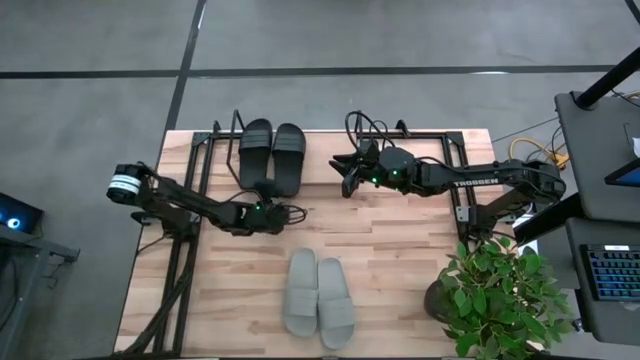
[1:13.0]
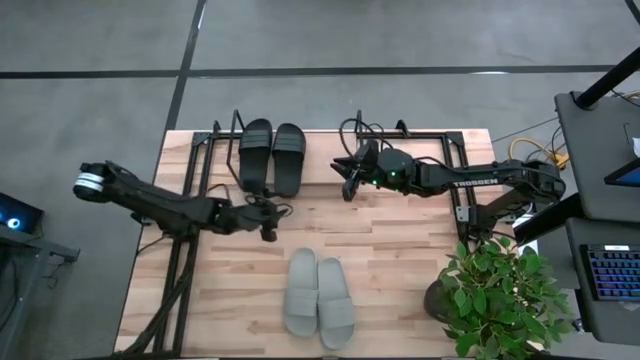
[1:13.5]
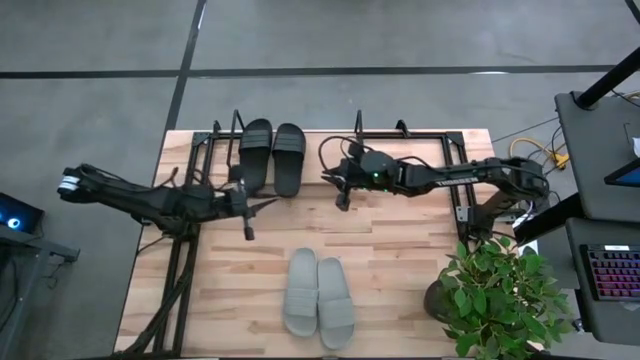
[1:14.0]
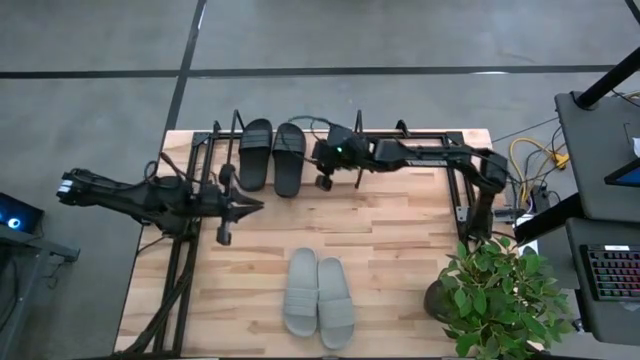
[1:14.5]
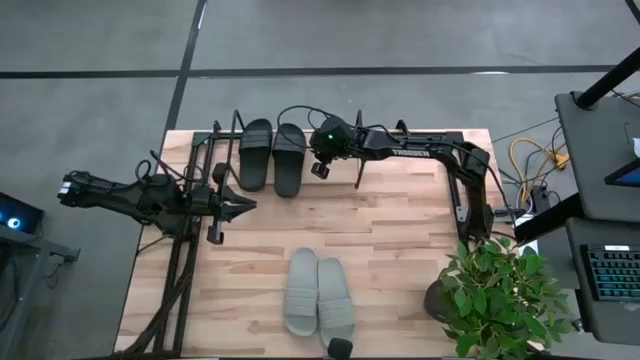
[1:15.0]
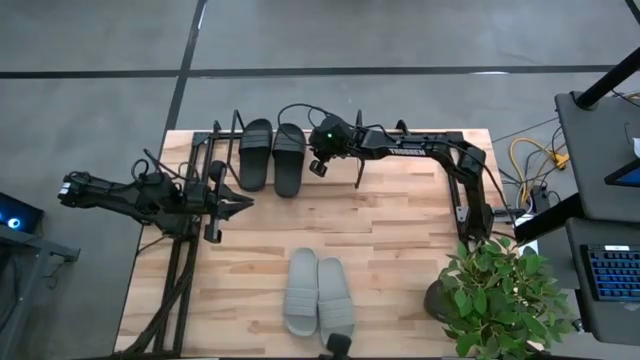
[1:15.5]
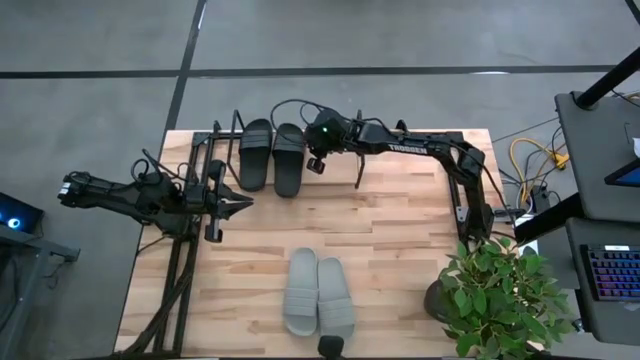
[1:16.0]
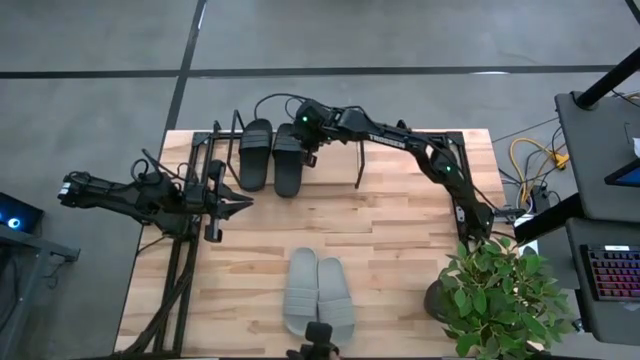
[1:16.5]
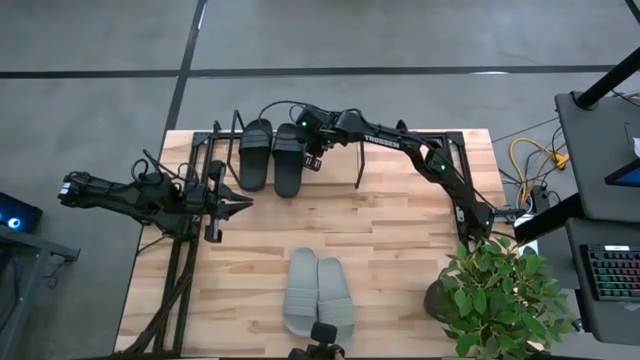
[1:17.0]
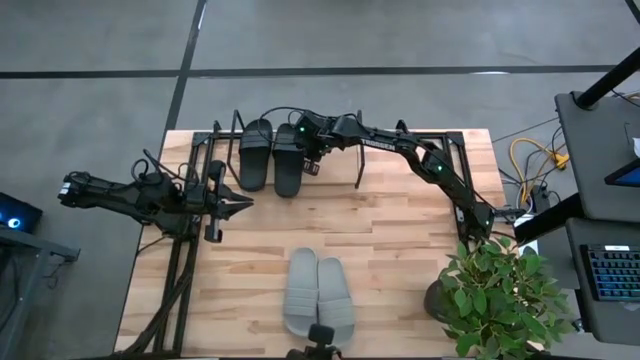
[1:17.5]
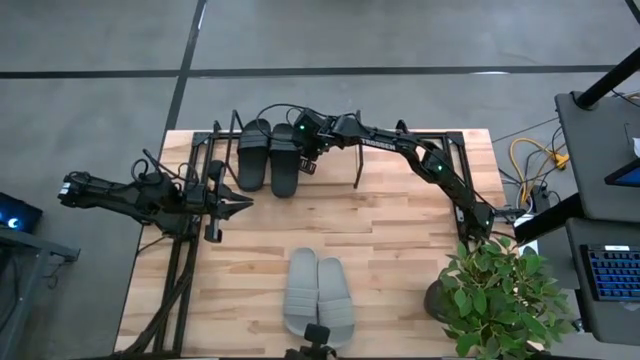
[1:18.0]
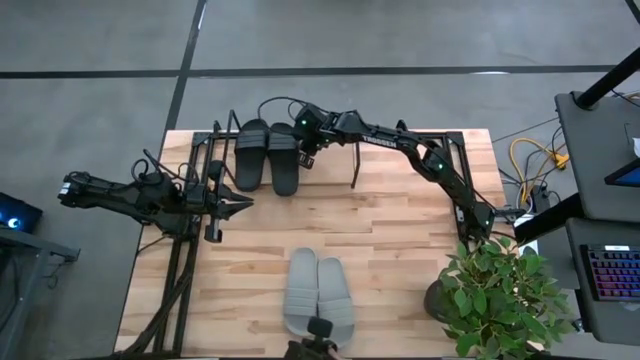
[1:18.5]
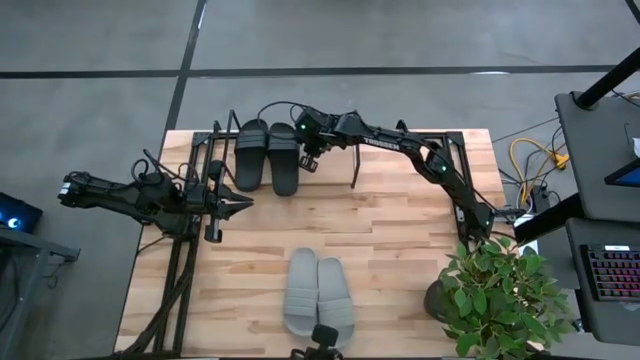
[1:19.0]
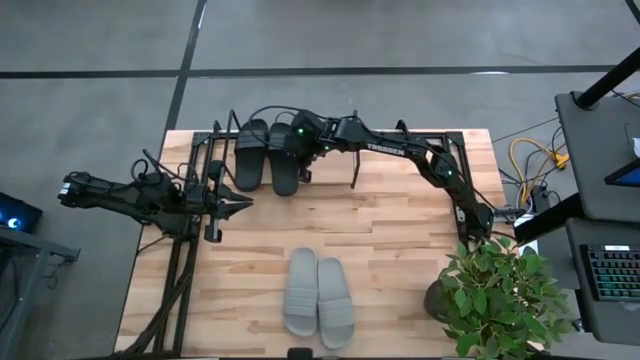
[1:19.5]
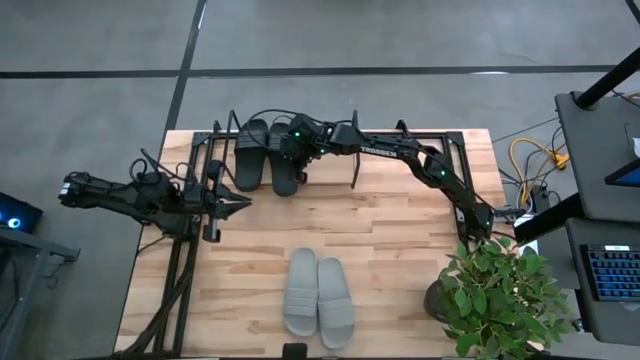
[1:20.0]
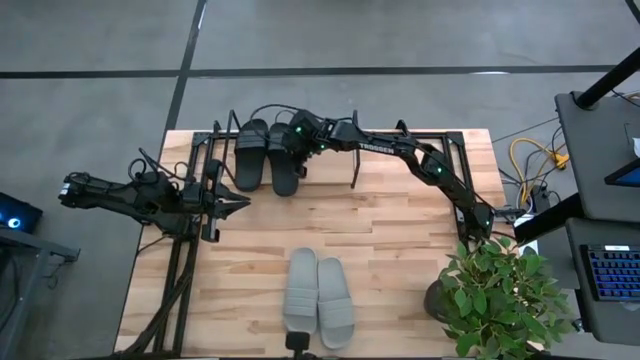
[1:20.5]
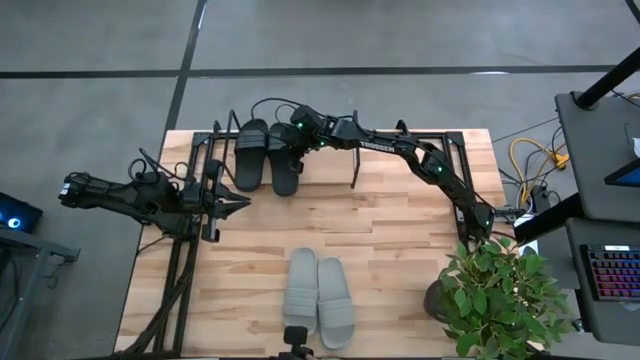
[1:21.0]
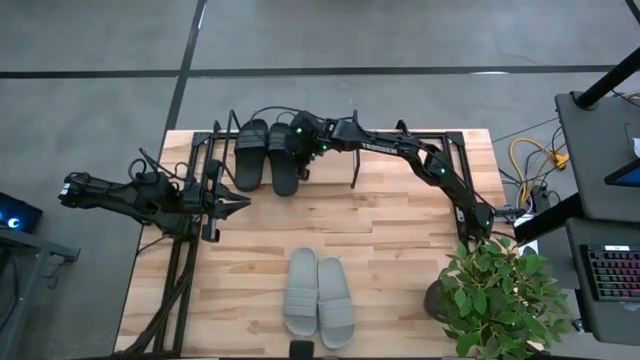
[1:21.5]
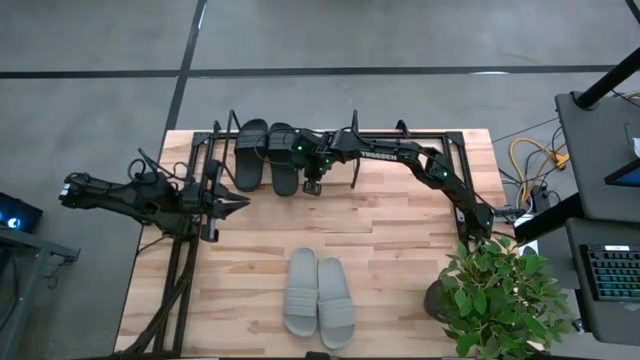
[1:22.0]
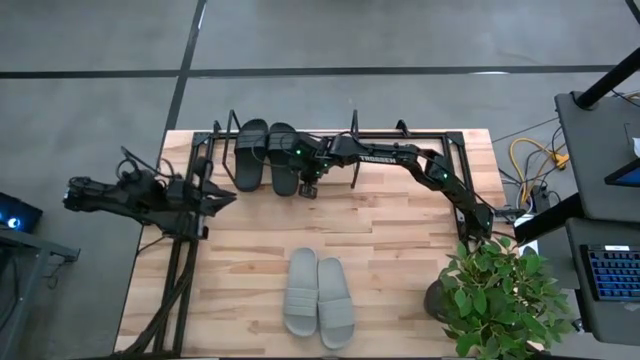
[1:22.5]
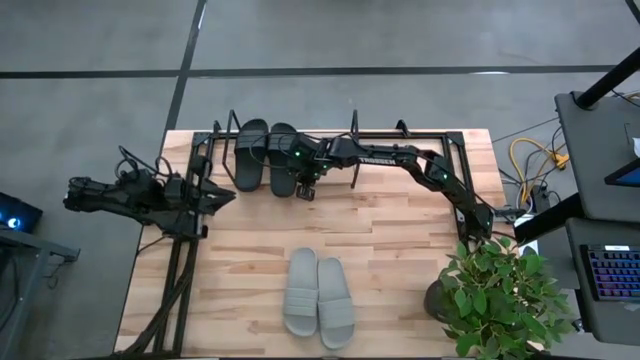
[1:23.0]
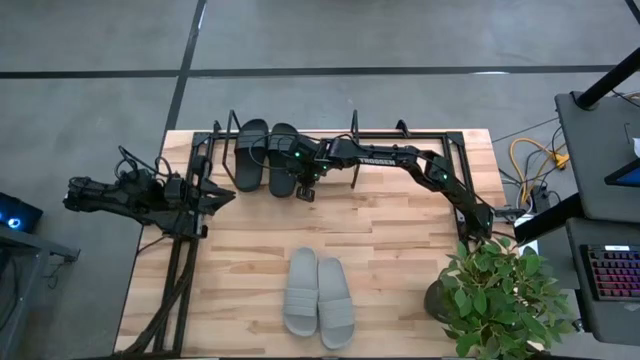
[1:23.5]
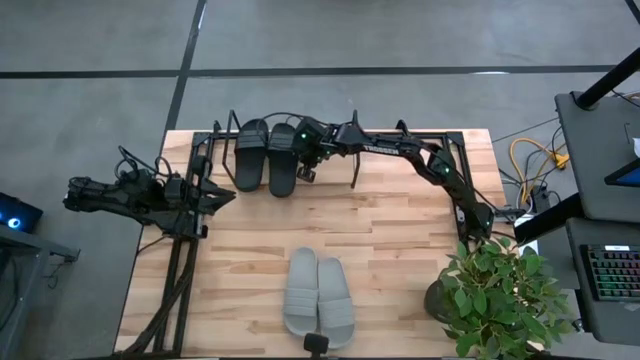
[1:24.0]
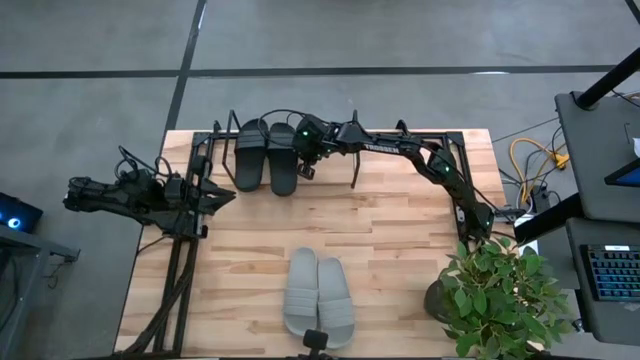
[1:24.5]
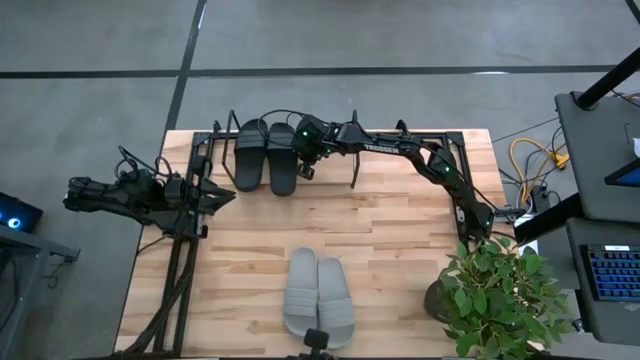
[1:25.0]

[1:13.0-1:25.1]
Task: Pick and place slides into the shelf
Adjust the right black slide from the shelf

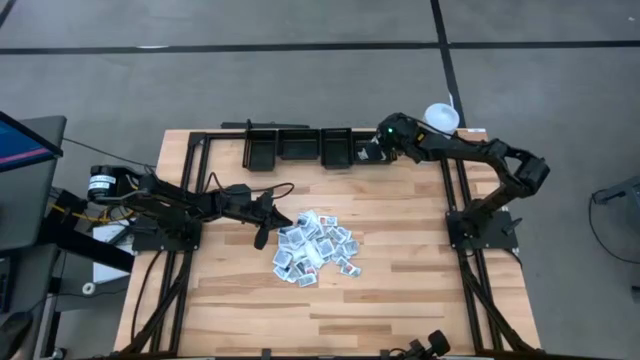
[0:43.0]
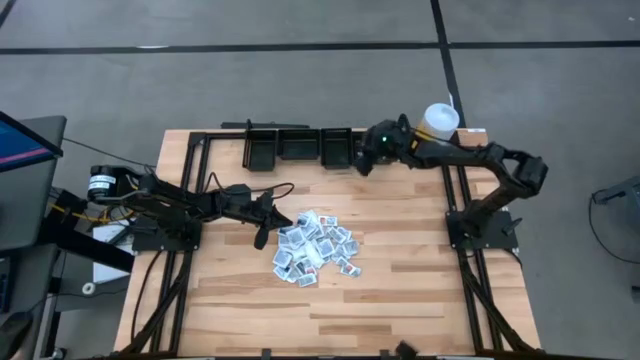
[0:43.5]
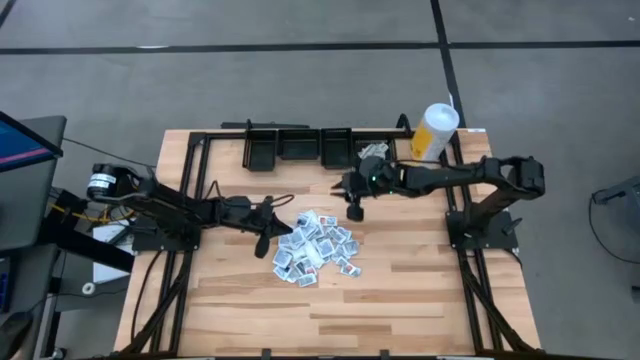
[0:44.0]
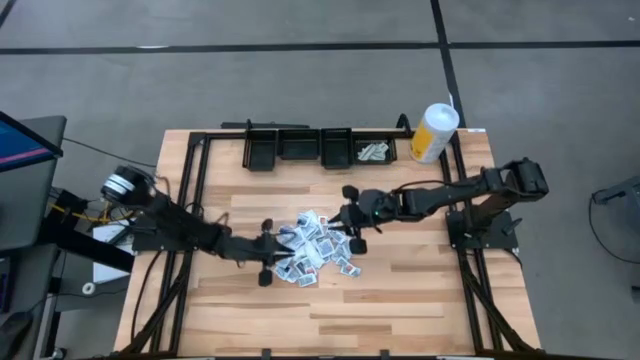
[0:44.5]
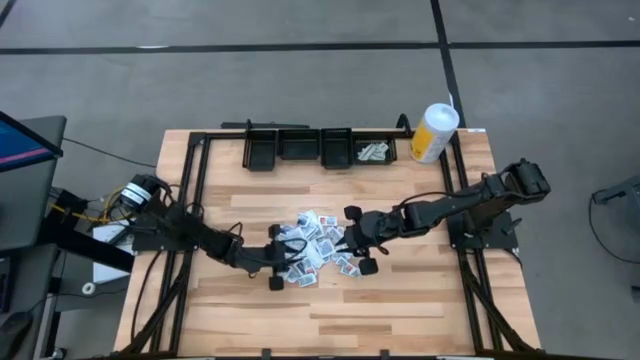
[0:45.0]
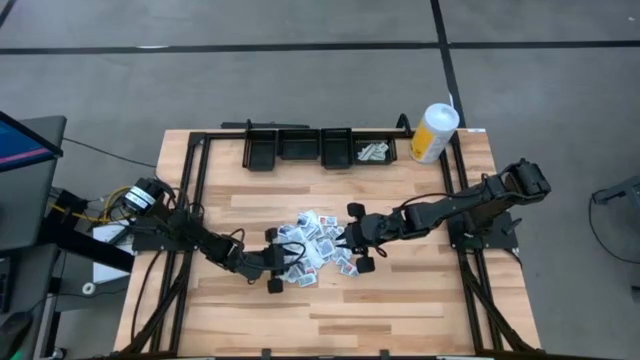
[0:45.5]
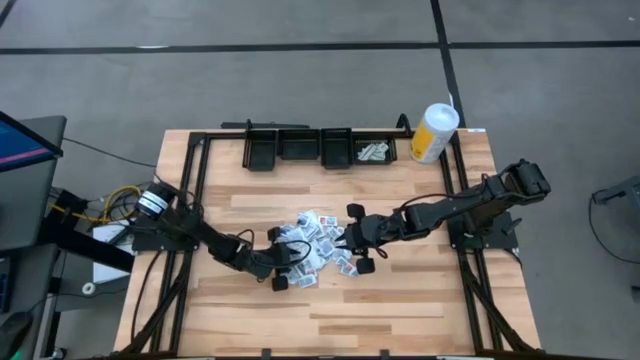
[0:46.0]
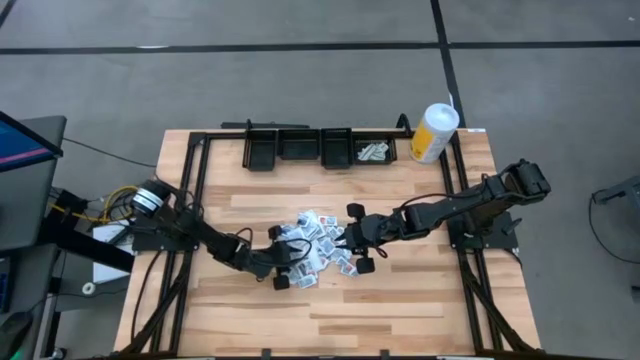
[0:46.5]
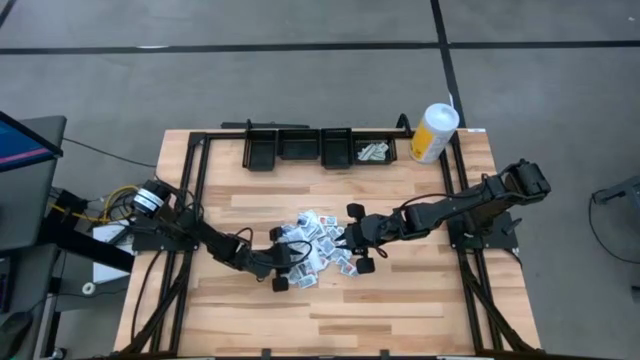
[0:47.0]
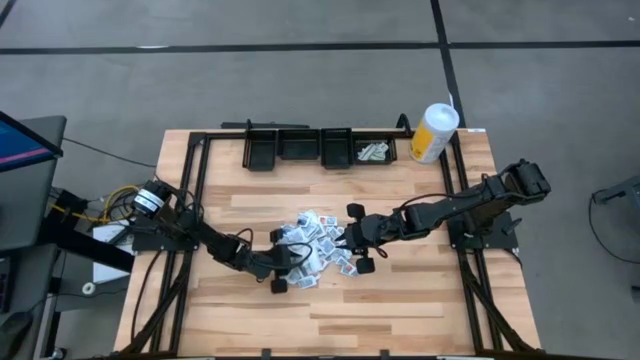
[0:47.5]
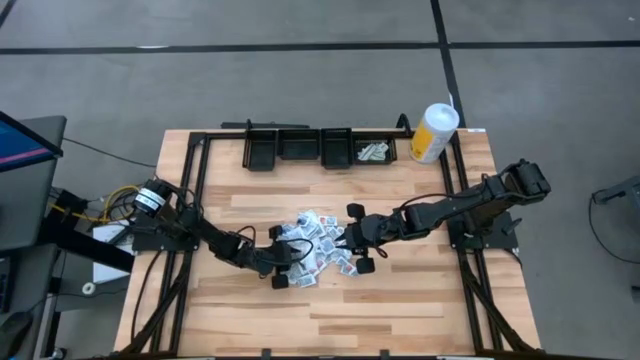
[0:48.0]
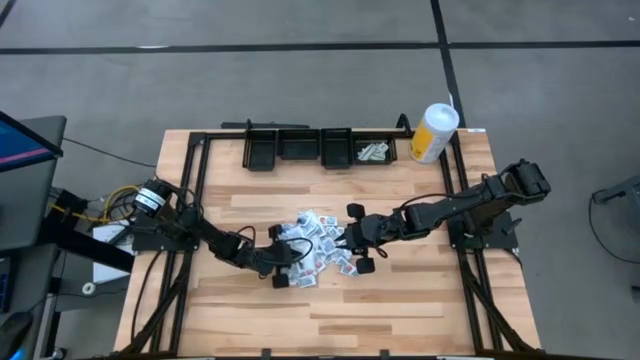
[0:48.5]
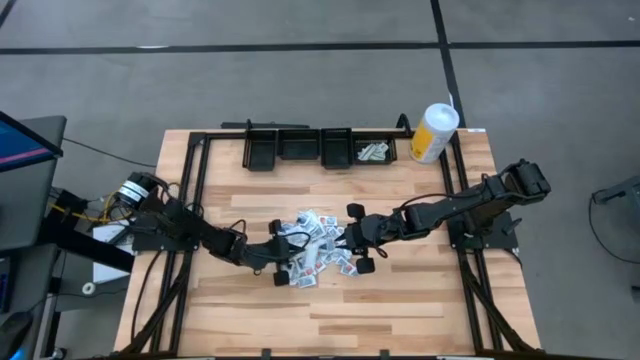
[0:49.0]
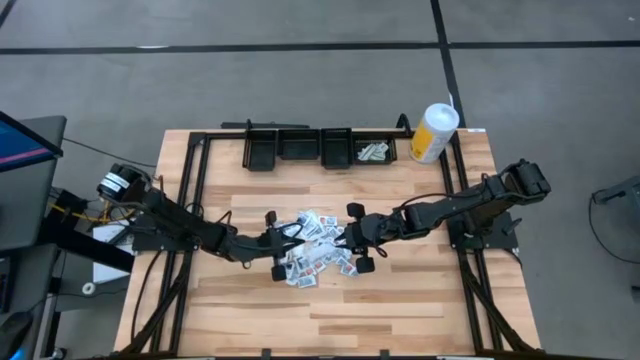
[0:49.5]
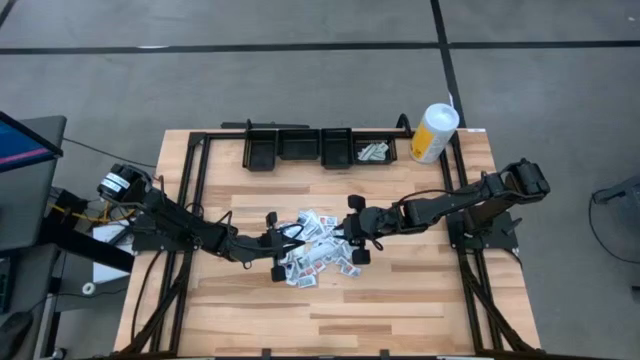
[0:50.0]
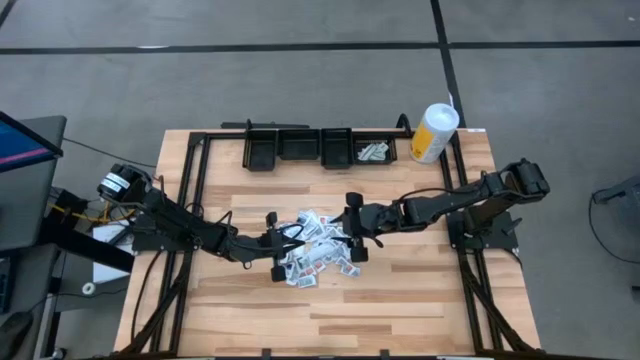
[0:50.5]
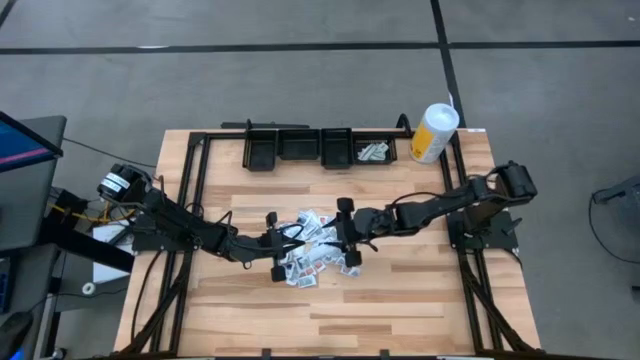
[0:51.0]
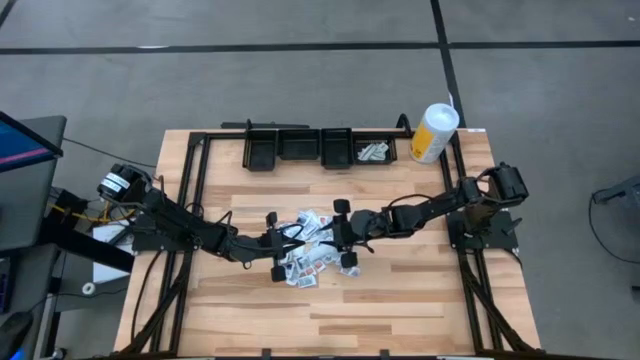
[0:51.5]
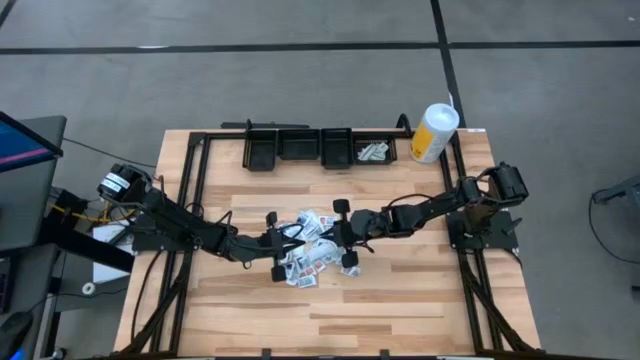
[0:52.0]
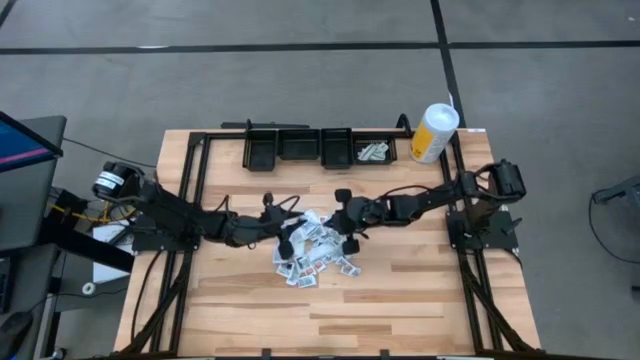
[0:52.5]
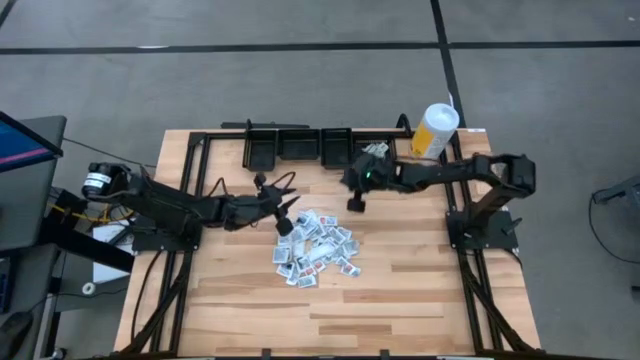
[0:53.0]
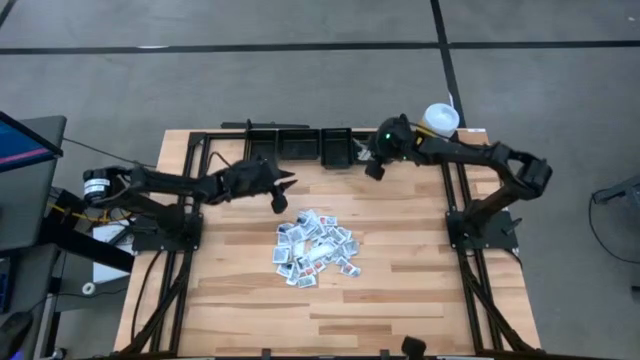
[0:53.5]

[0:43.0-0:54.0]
Task: Pick & Place First Aid Supplies
Put the green bandage pack into the right black bin
